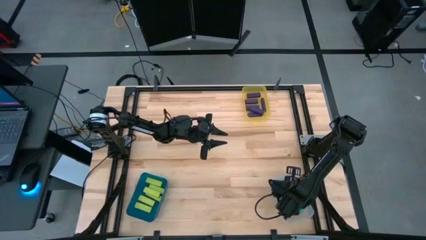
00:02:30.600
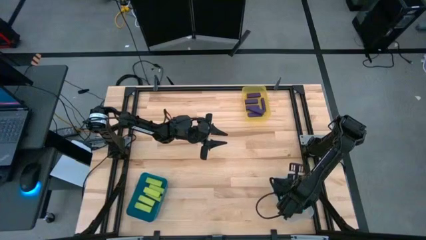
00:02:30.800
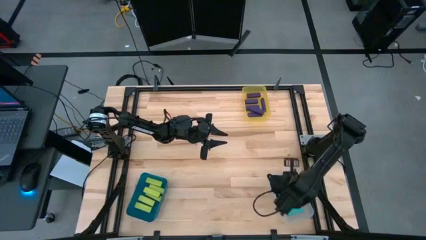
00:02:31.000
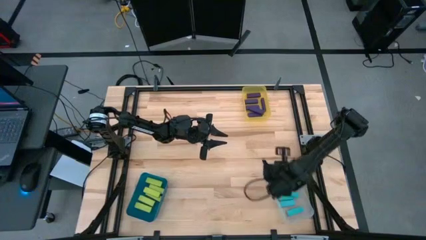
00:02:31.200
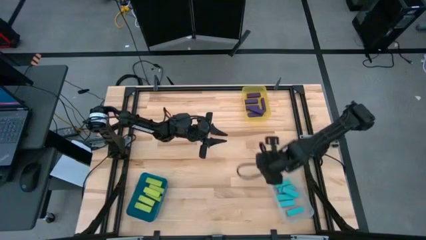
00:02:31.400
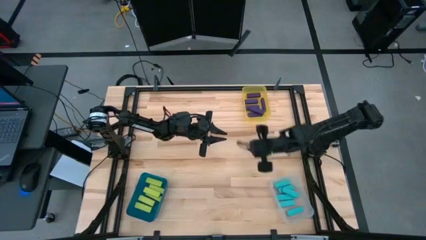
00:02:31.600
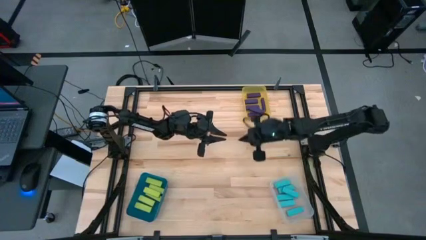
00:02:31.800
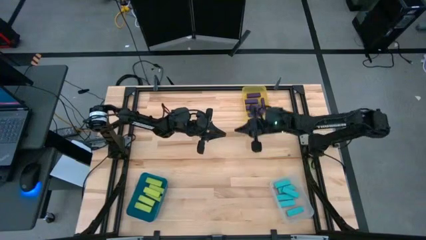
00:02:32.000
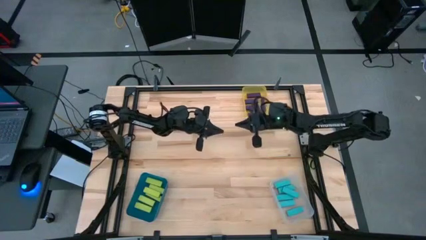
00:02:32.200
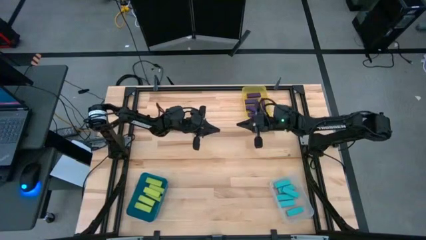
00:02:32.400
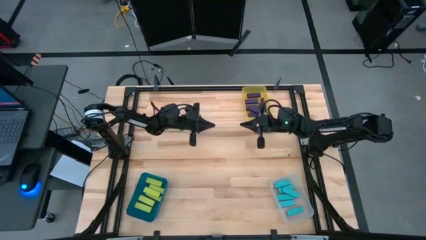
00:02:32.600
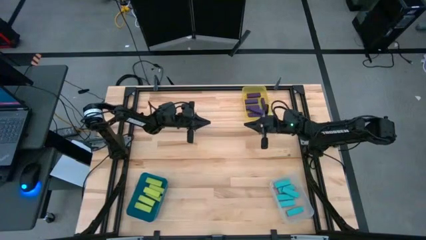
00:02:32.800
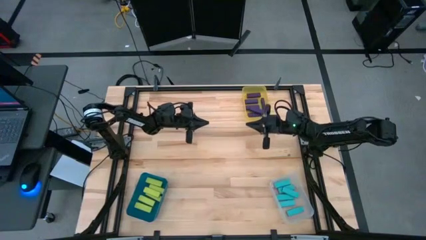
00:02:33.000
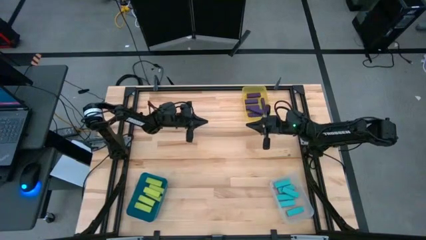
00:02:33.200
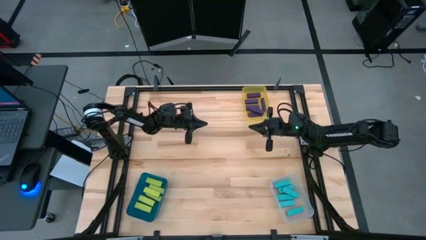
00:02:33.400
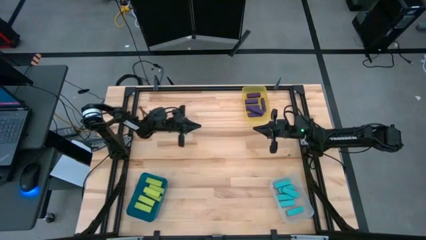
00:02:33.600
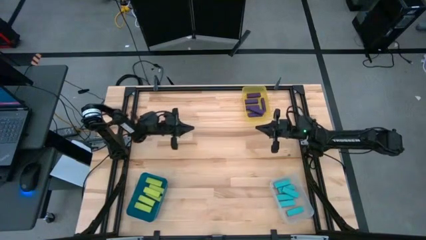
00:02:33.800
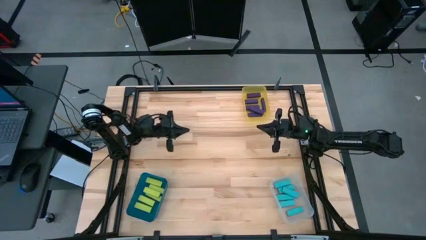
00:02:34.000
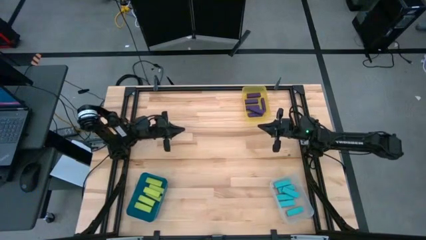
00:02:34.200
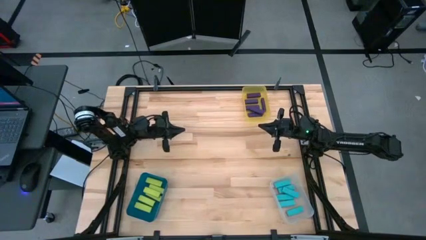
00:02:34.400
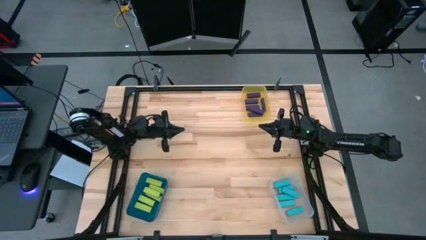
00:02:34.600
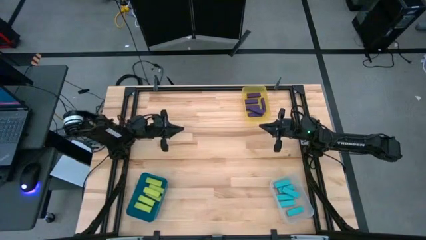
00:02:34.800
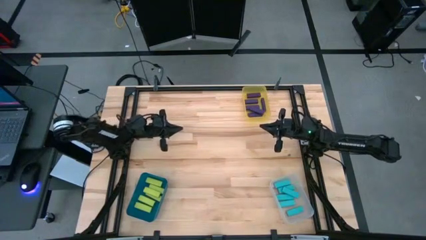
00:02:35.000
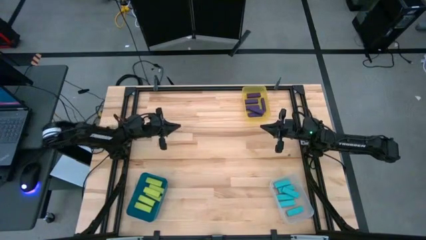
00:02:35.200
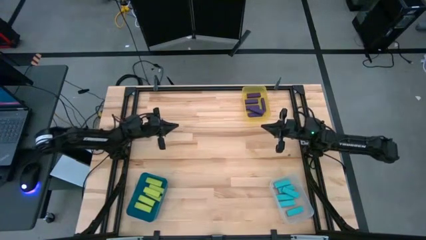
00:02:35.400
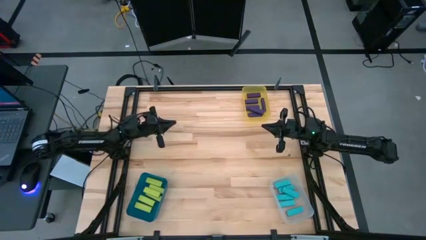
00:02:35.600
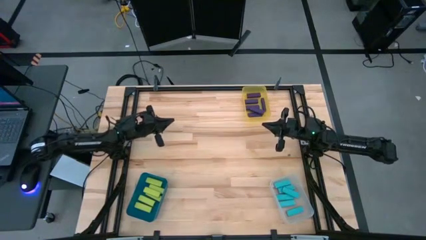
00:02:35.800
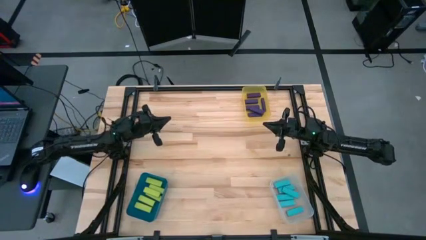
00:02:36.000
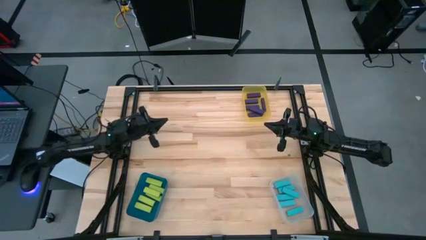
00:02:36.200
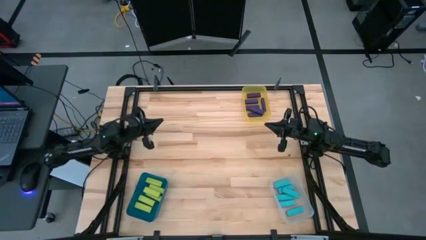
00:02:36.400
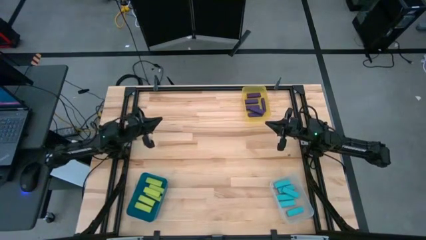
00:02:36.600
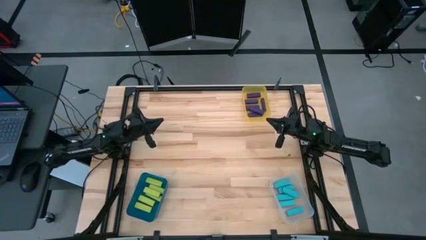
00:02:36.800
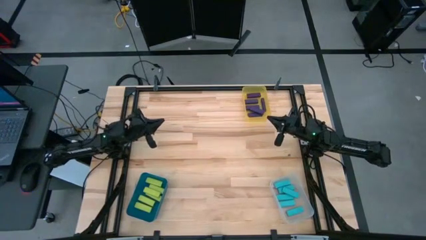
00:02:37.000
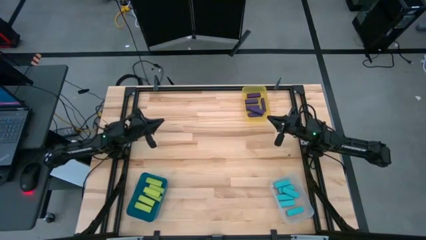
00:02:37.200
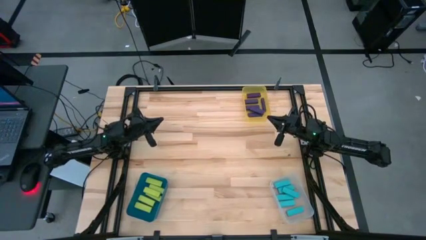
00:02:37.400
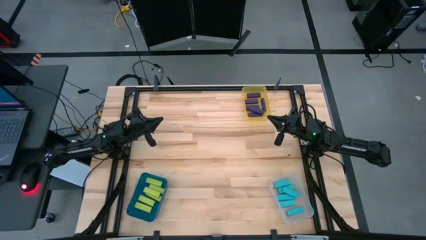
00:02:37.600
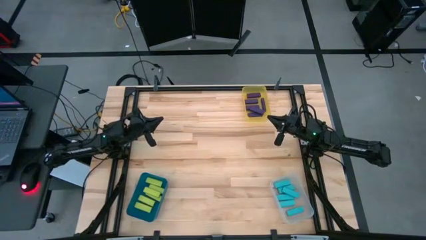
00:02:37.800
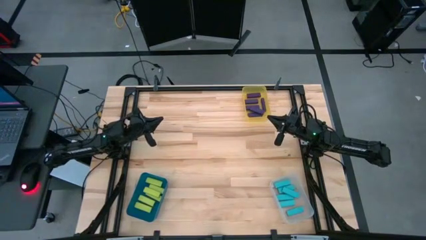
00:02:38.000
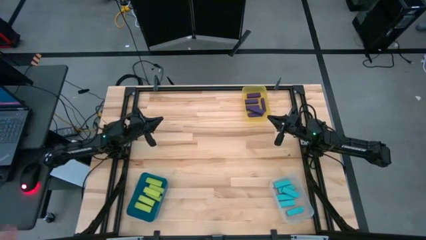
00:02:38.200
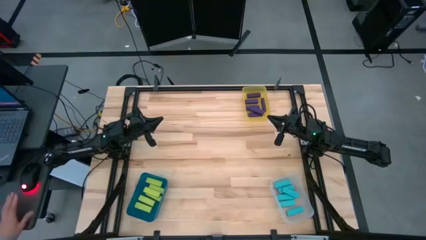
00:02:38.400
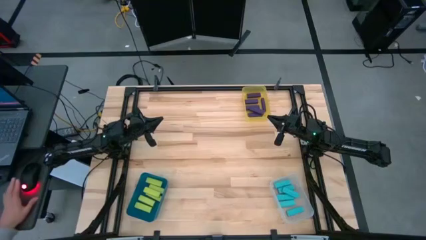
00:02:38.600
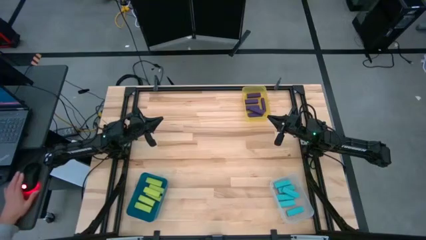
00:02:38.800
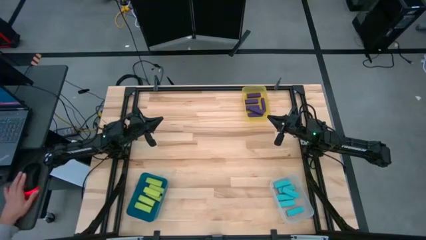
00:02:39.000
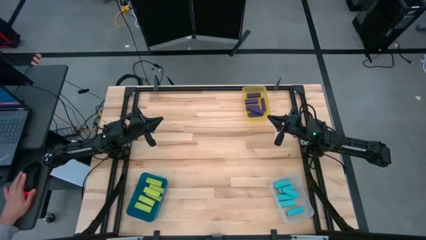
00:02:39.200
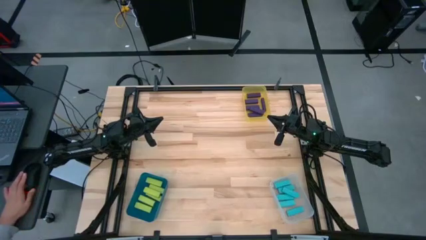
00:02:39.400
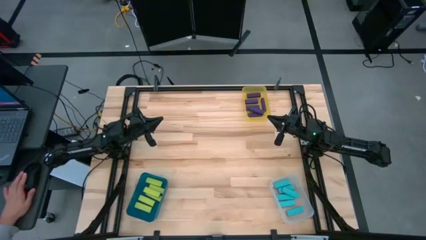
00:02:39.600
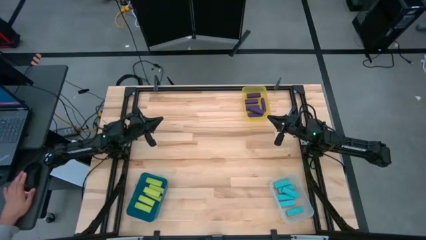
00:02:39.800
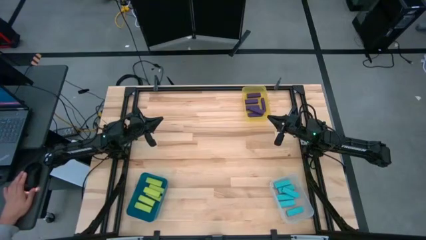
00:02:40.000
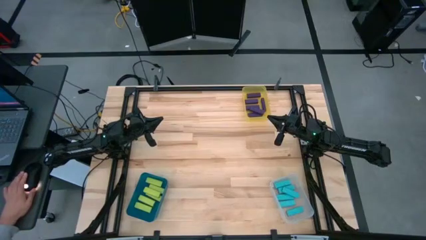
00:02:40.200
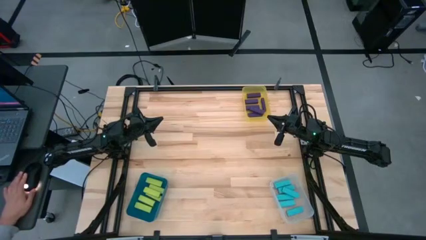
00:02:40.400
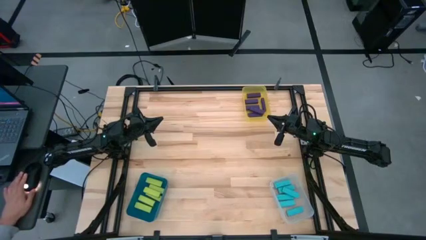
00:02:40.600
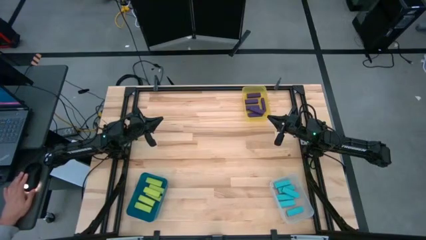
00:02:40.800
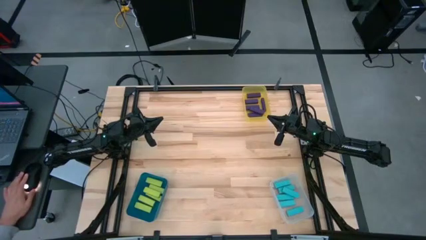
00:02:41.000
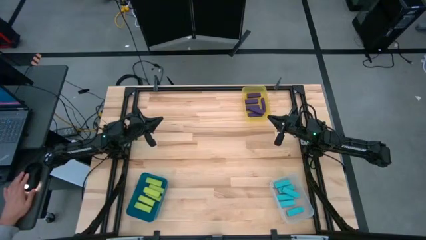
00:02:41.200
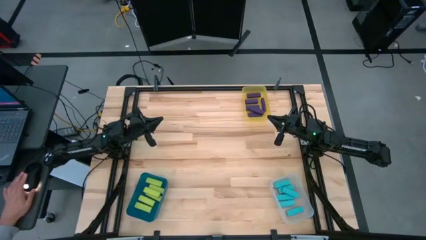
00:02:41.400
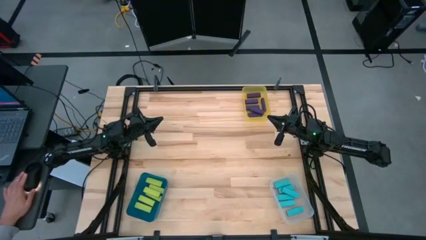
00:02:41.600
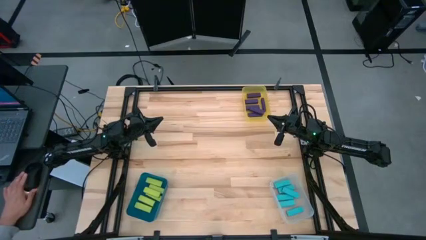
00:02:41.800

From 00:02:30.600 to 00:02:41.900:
Task: Sort blocks
Return to Home Position

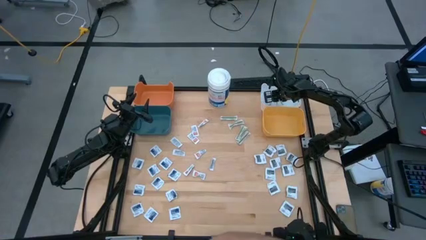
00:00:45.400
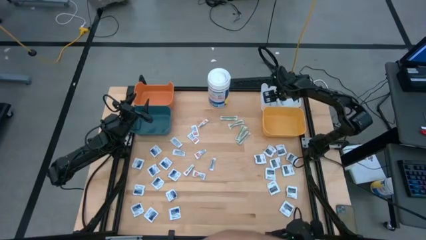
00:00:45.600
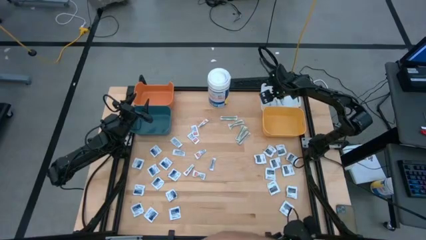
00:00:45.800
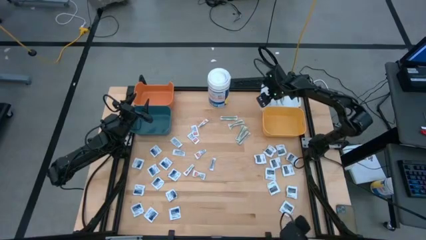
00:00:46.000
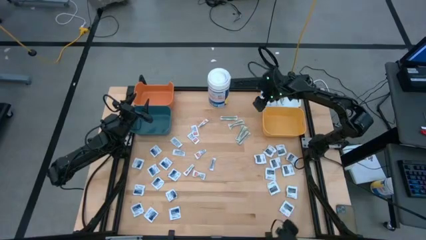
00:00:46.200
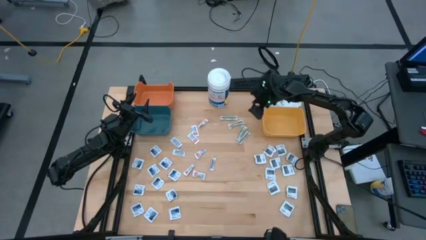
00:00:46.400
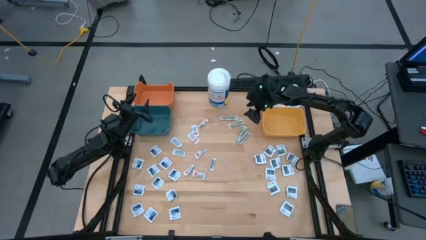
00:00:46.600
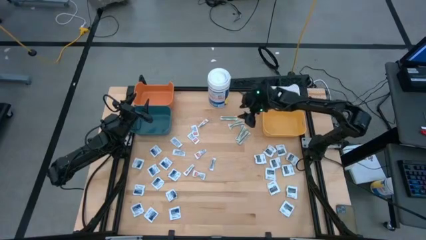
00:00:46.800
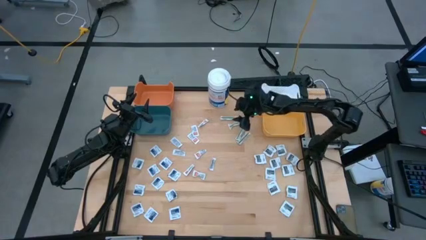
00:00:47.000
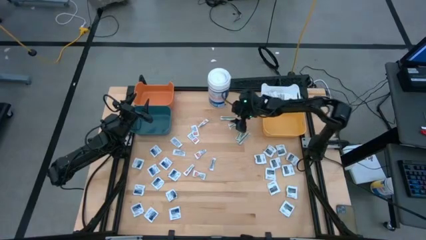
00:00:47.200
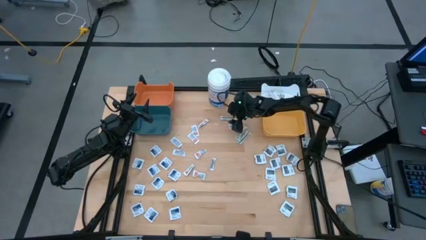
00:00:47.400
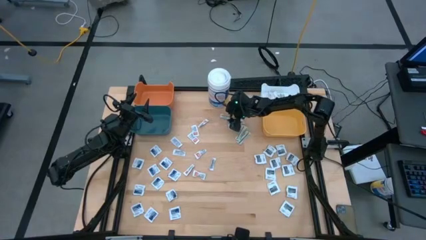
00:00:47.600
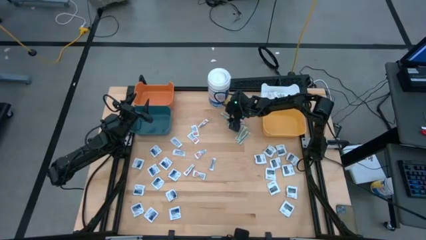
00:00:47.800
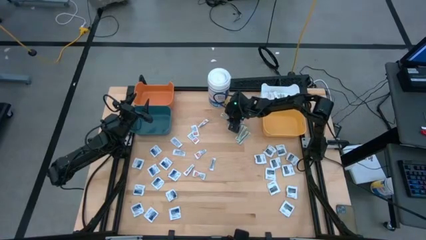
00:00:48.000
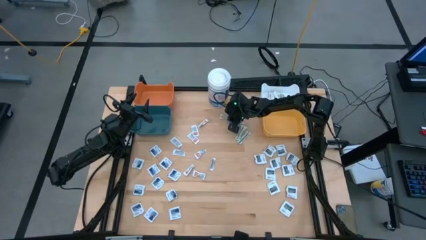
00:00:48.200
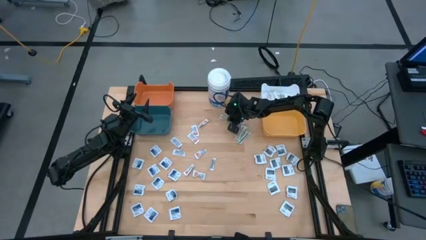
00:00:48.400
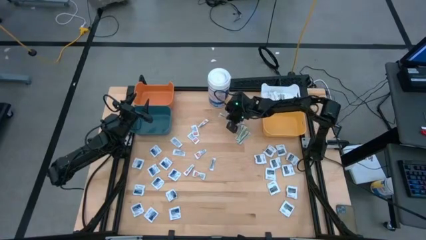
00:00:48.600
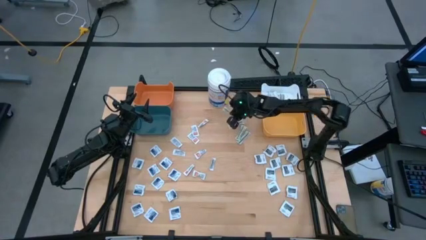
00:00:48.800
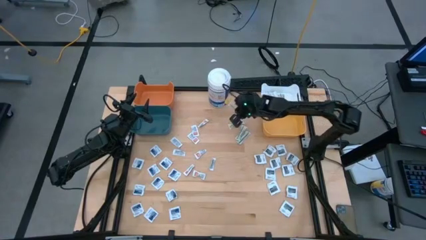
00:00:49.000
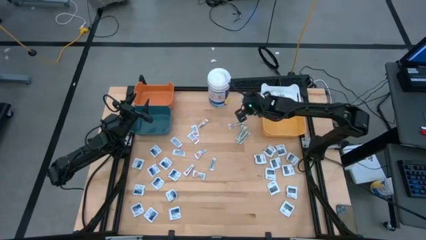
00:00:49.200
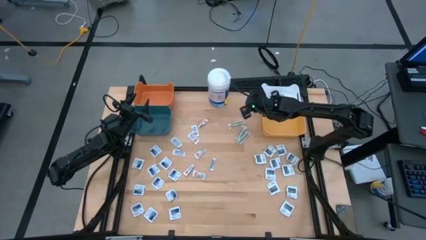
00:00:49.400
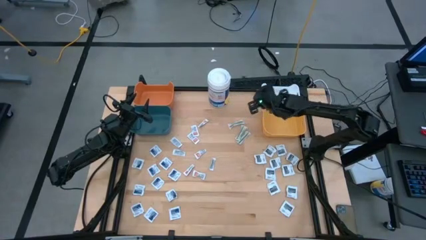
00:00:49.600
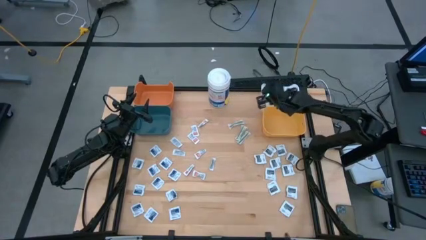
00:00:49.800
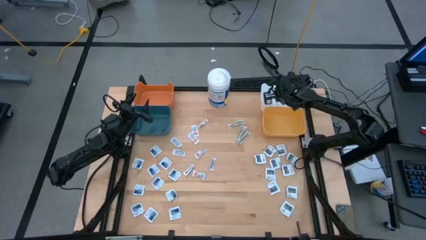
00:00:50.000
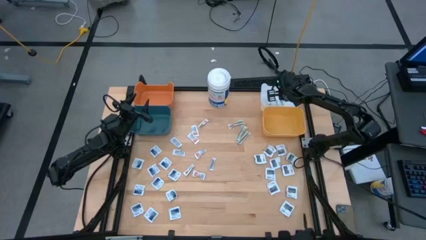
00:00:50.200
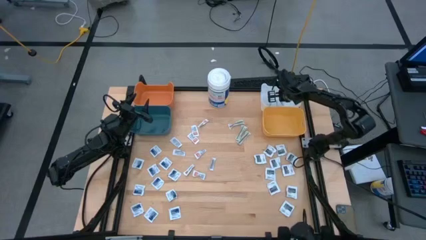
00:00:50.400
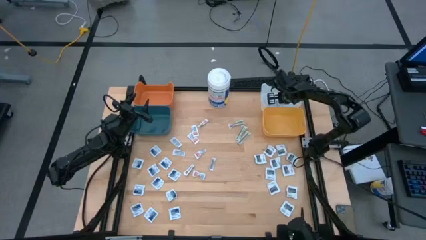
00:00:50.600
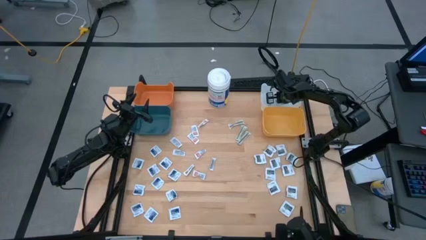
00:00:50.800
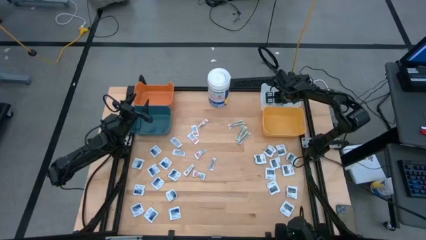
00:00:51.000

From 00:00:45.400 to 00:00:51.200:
Task: Pick & Place First Aid Supplies
Put the green bandage into the white bin
